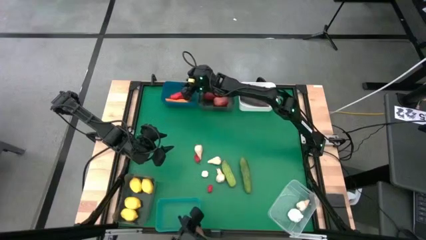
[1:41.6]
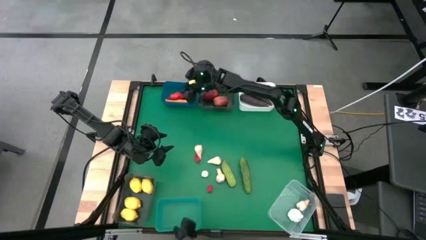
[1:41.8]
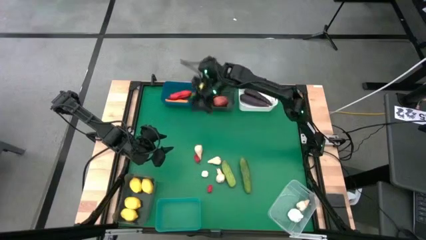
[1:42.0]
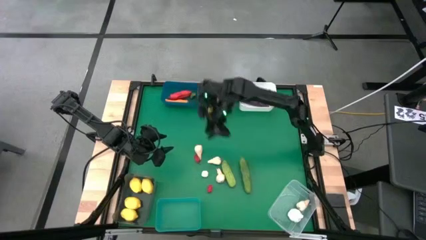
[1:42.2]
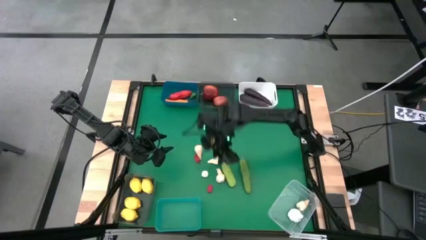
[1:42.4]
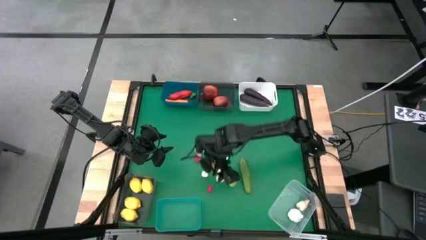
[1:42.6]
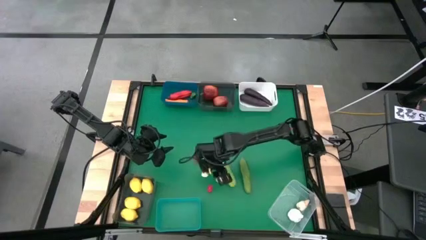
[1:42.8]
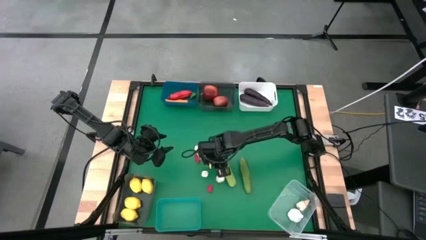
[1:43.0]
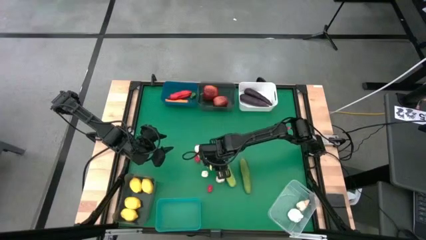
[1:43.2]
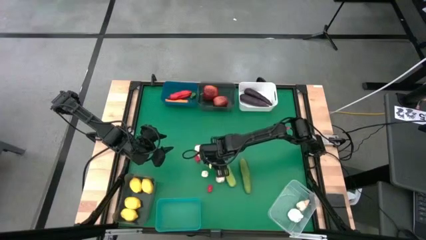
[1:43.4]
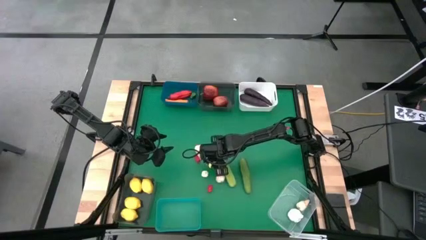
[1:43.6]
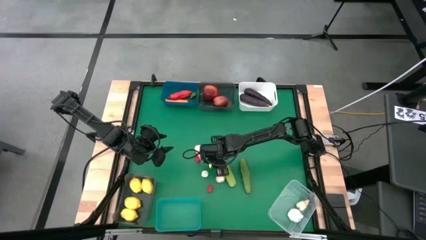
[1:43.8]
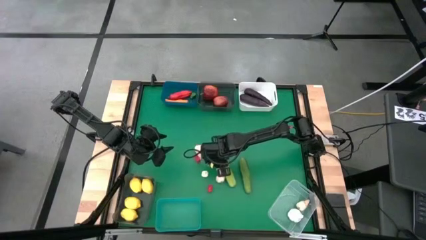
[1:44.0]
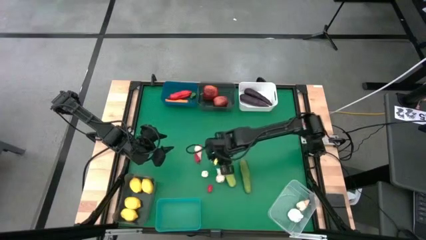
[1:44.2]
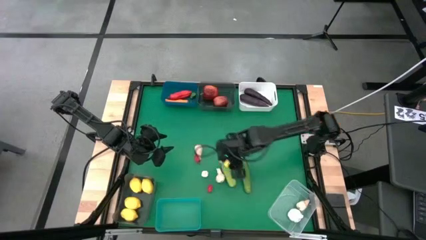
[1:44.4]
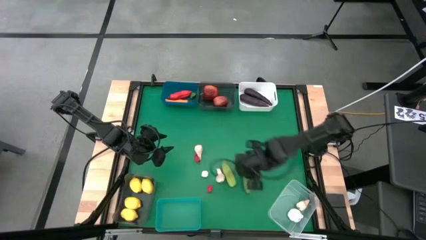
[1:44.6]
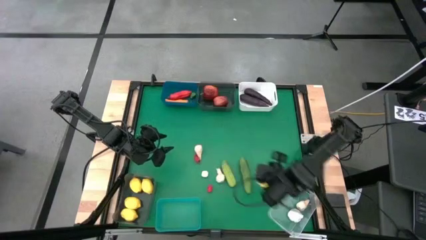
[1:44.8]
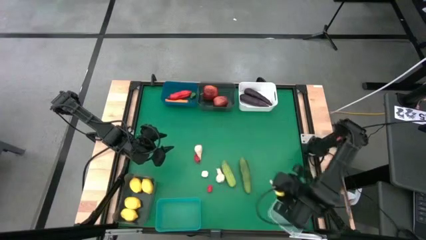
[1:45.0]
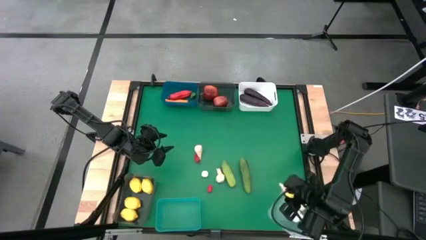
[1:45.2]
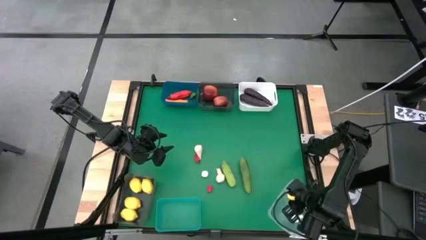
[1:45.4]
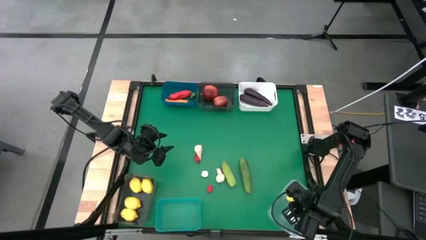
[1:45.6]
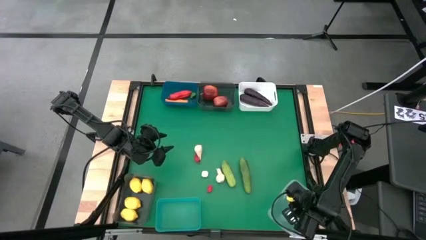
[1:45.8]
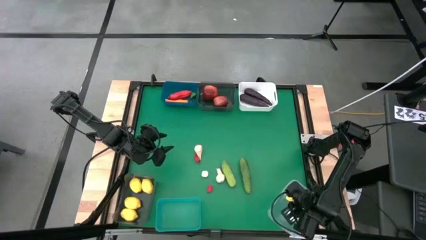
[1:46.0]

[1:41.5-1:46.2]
Task: Sort produce into baskets
Put the white garlic into the transparent bin

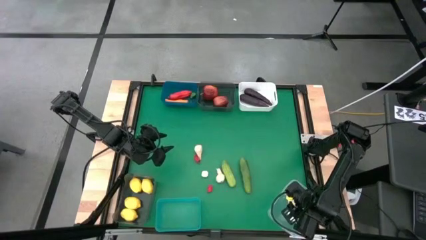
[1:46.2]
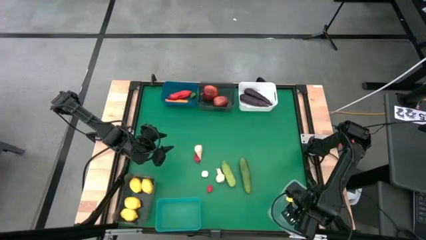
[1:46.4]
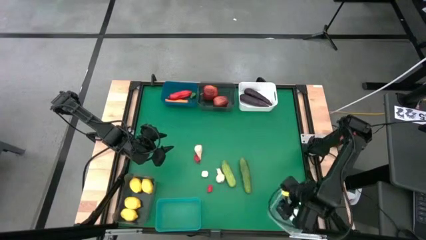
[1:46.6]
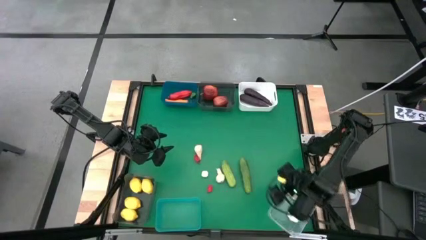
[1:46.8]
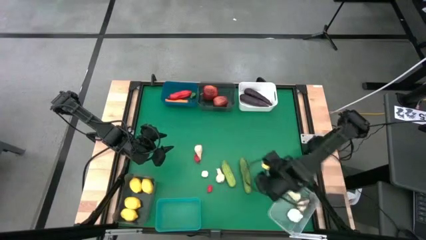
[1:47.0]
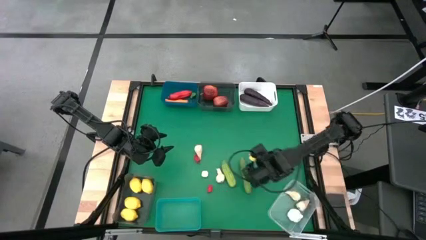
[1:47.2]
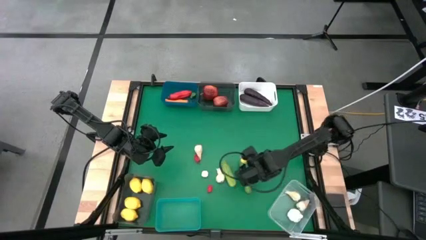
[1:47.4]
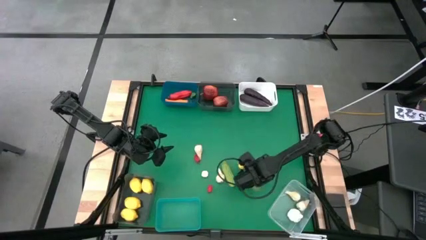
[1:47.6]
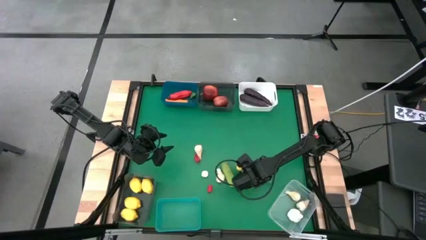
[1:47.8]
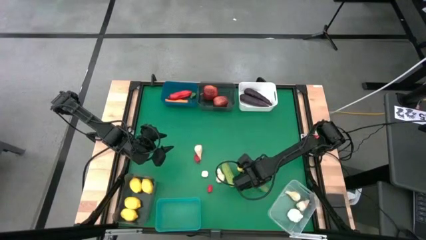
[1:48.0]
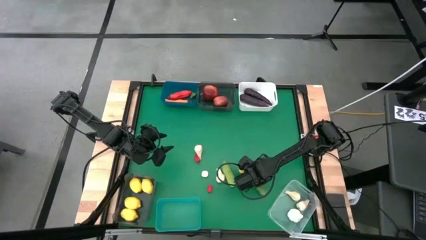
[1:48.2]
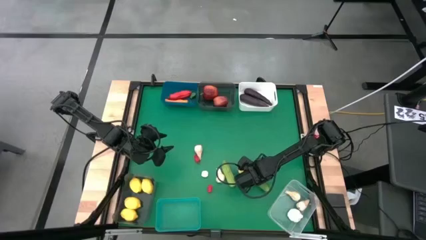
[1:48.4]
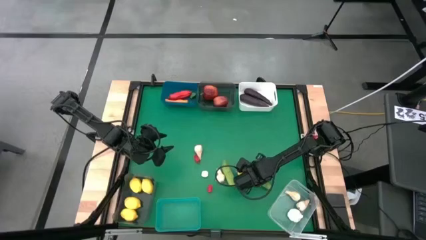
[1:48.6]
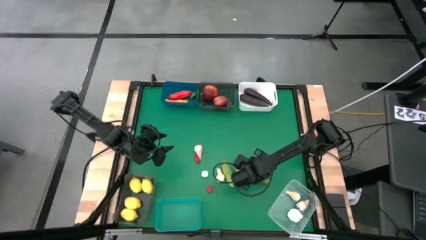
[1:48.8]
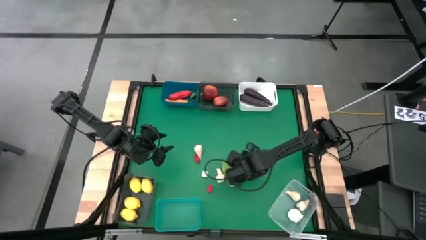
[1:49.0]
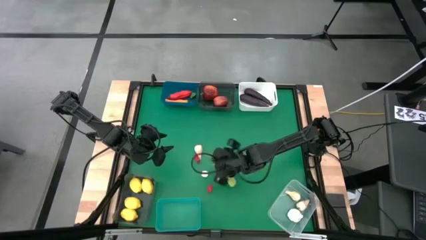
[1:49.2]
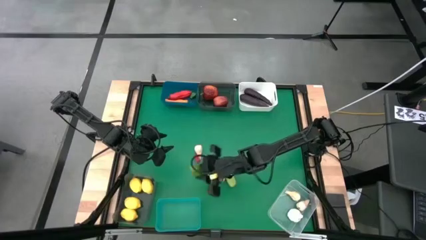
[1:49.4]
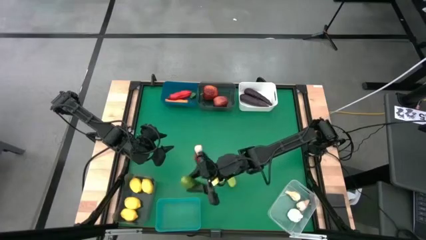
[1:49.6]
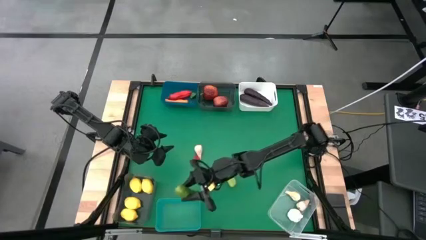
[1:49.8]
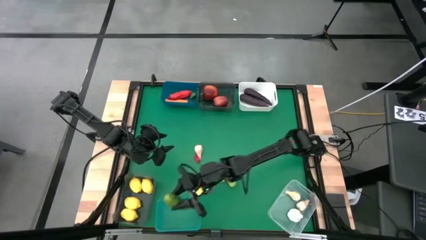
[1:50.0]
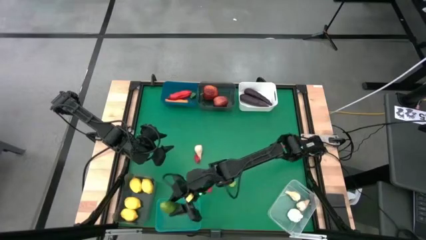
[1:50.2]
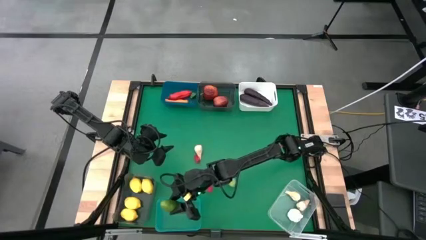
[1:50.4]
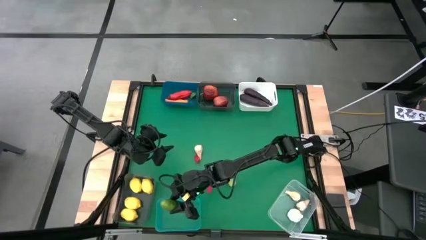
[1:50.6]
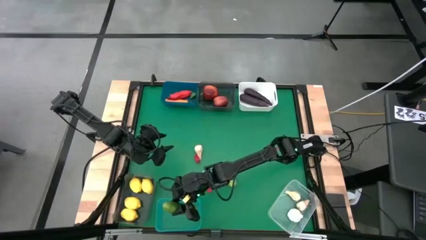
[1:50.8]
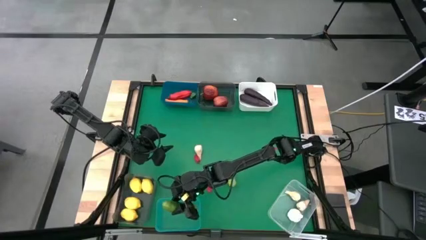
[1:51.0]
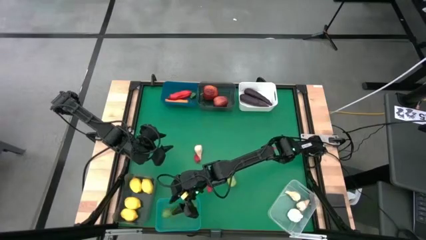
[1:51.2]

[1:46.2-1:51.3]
Put the green cucumber into the green bin

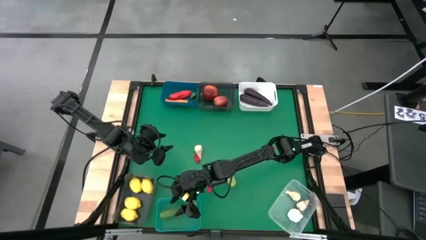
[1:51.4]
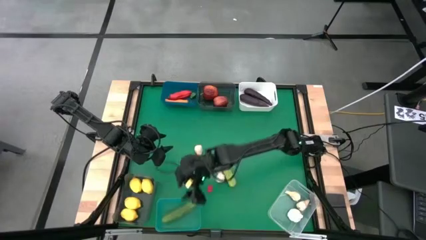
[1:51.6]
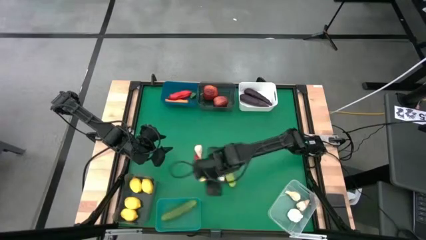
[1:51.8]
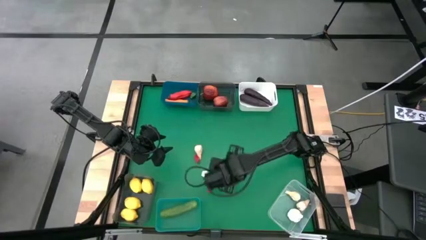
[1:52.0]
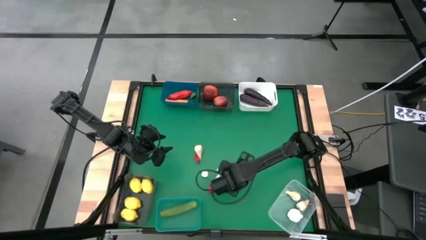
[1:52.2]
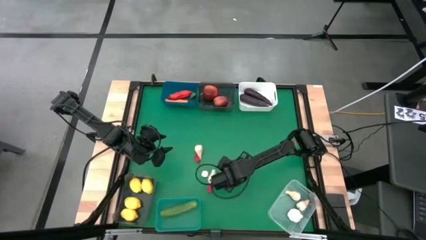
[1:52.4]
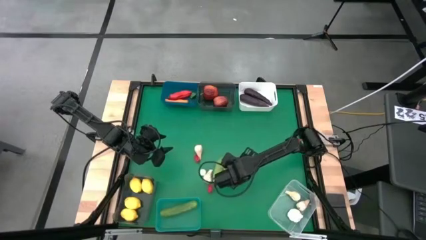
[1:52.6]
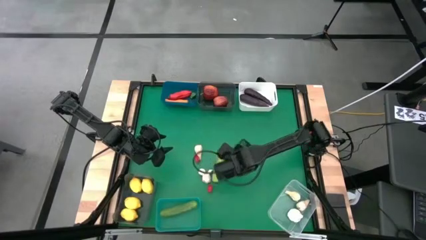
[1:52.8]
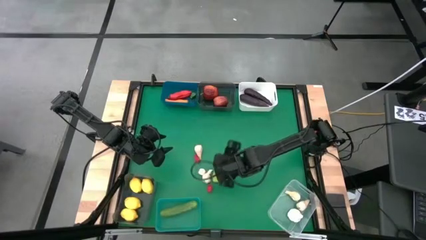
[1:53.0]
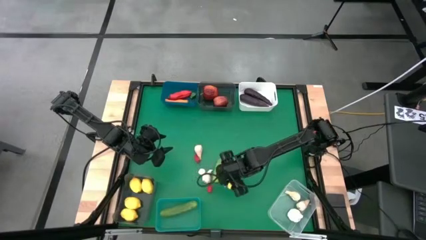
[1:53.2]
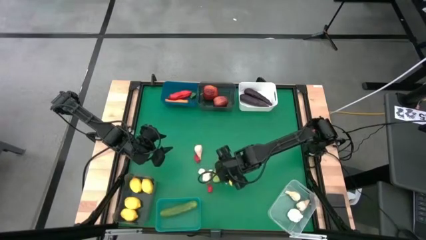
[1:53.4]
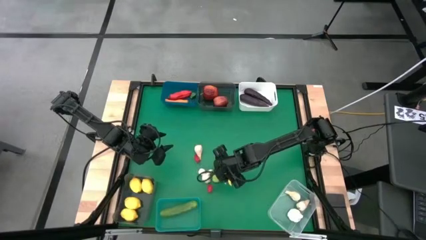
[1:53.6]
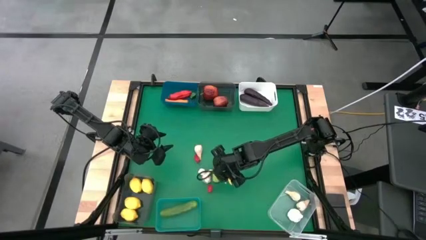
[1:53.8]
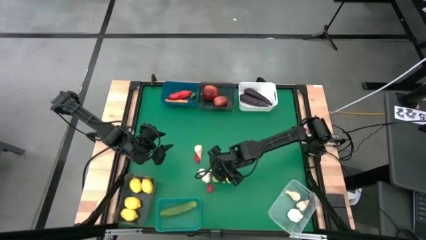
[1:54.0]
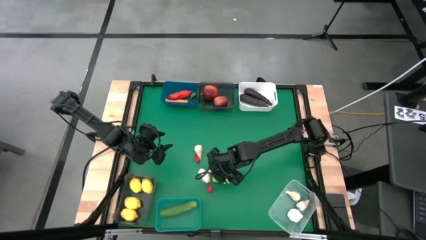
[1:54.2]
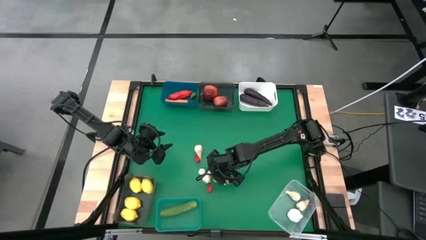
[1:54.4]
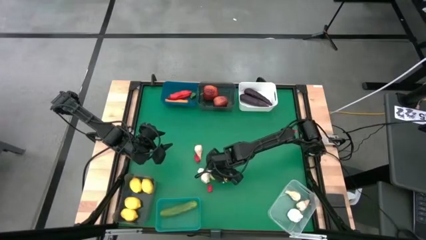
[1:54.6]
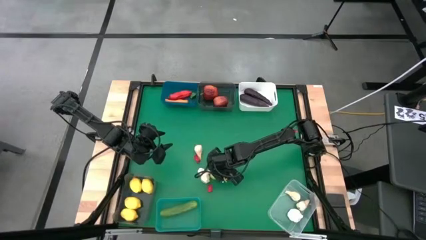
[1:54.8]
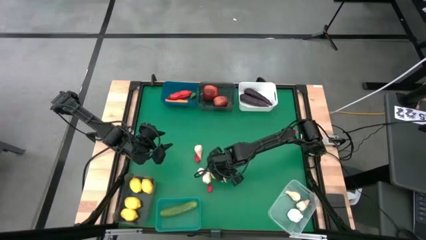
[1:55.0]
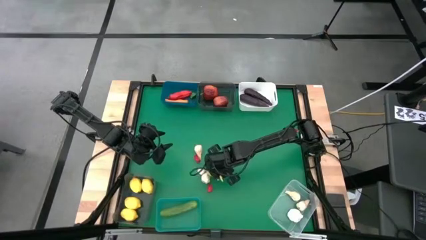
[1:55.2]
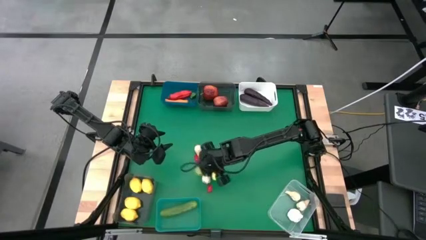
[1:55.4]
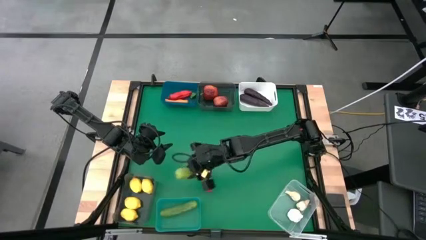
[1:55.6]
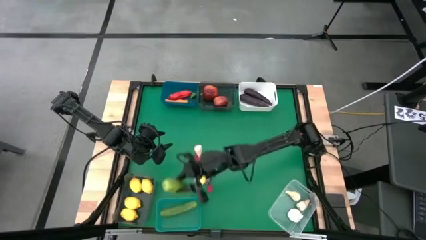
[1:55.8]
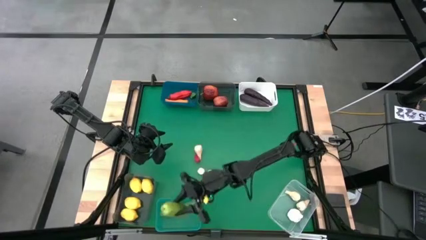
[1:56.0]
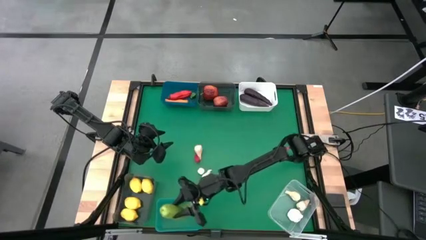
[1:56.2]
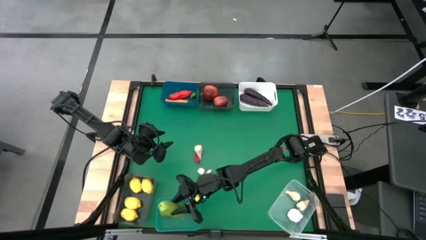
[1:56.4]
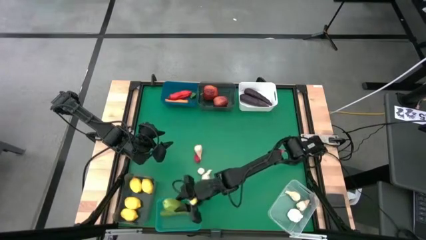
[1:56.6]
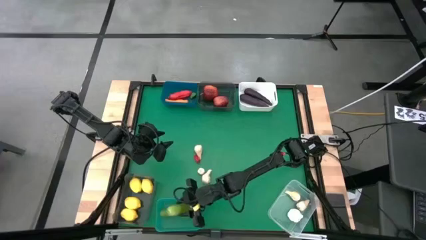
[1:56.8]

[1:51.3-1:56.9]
Put the green cucumber into the green bin

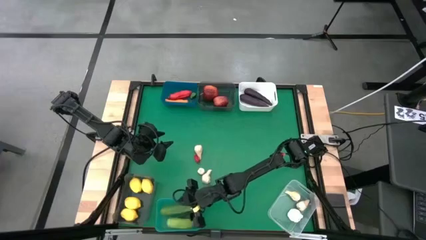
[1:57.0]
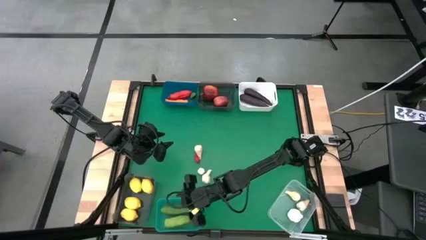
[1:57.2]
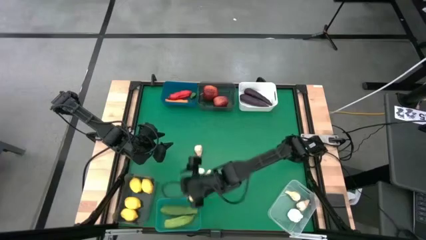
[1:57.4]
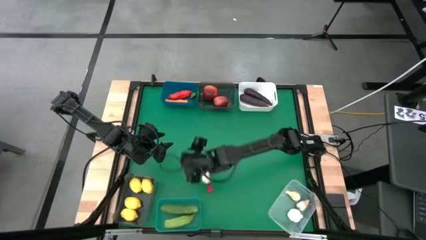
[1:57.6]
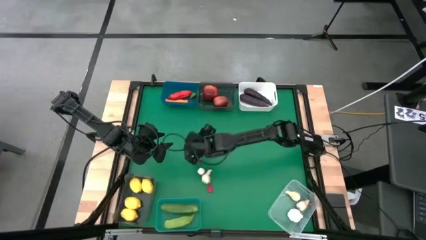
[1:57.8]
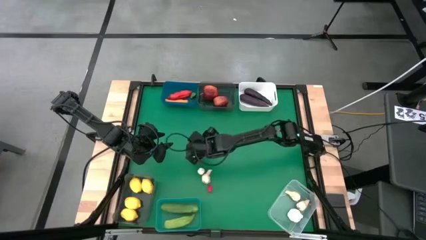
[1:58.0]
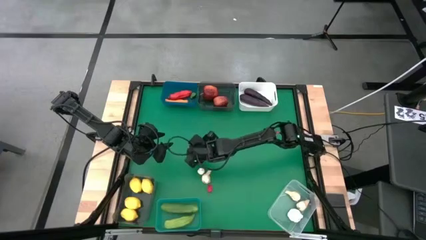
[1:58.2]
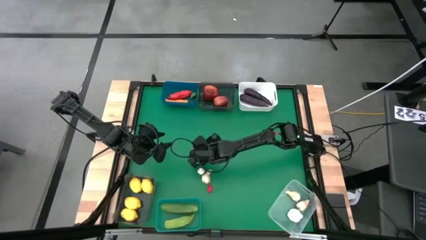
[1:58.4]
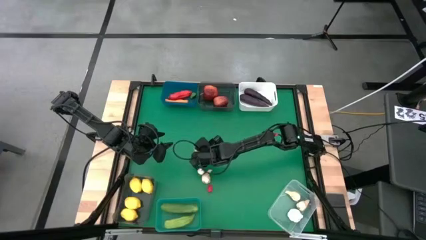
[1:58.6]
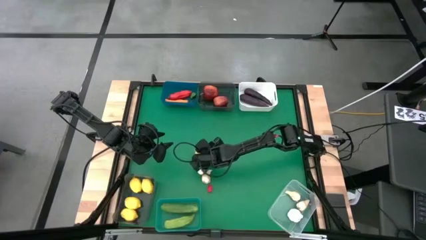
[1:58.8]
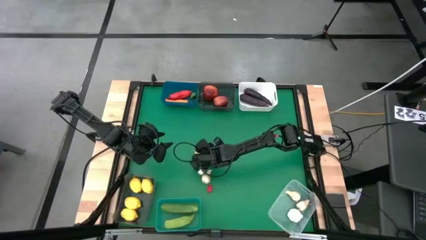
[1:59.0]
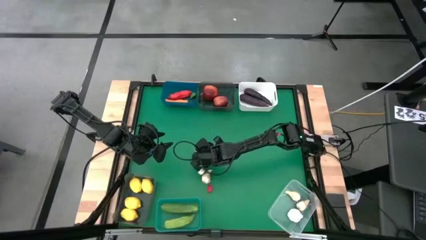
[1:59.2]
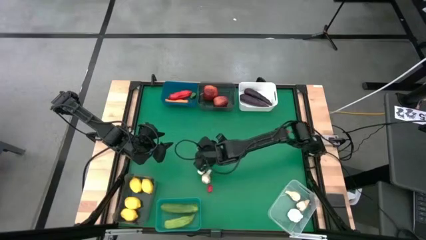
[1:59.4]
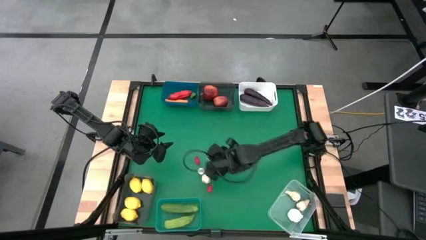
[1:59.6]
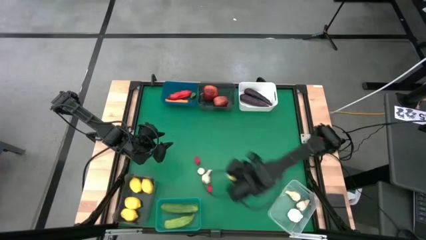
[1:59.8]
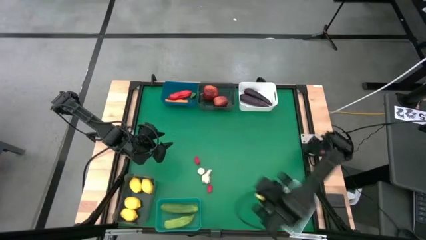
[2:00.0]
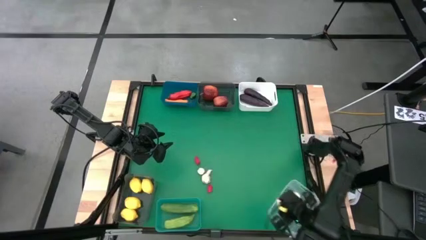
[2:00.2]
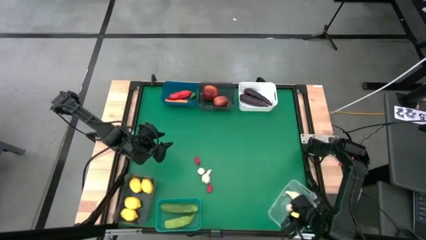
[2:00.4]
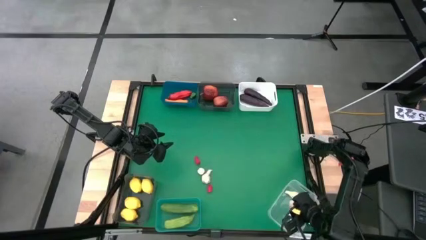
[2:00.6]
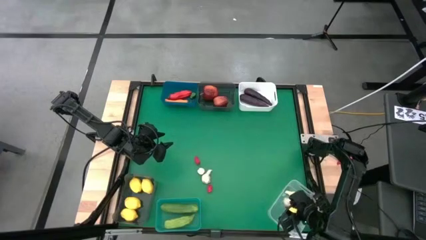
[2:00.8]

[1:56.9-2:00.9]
Put the white garlic into the transparent bin
